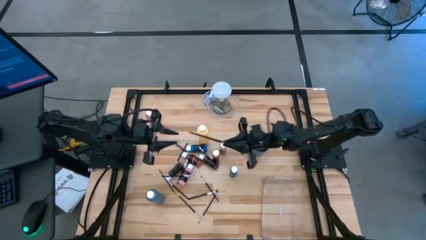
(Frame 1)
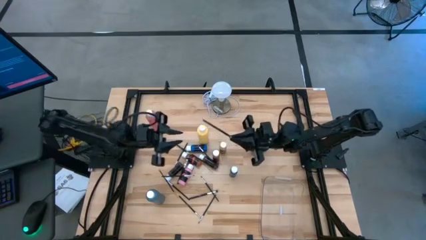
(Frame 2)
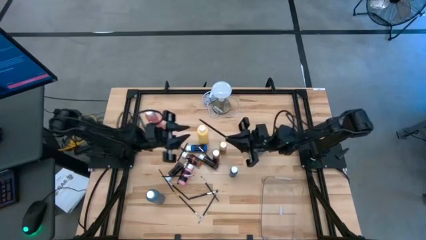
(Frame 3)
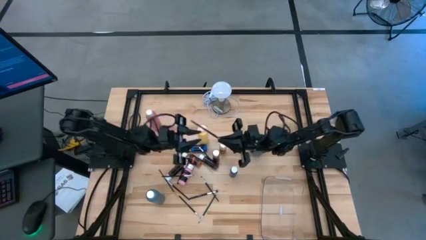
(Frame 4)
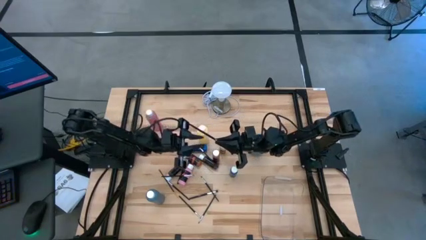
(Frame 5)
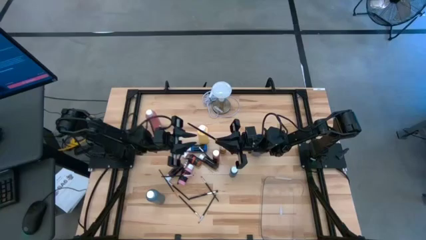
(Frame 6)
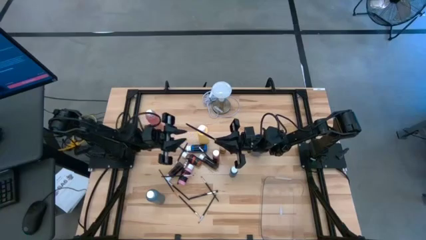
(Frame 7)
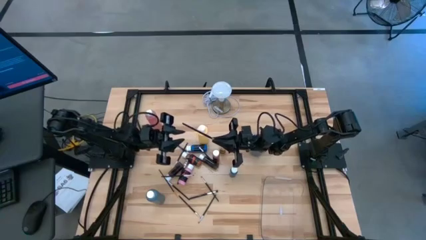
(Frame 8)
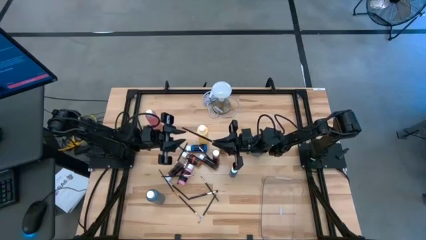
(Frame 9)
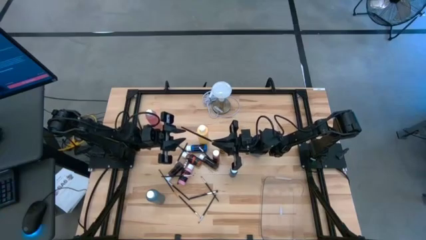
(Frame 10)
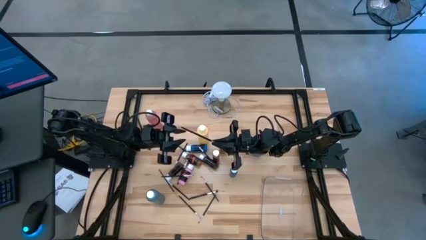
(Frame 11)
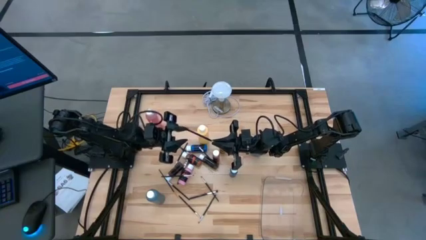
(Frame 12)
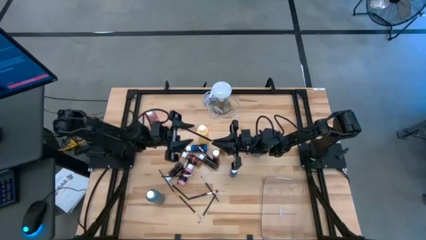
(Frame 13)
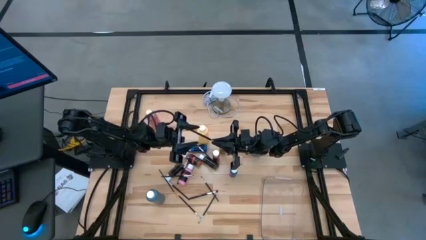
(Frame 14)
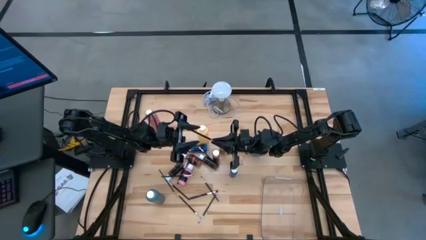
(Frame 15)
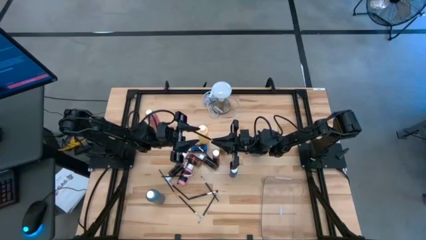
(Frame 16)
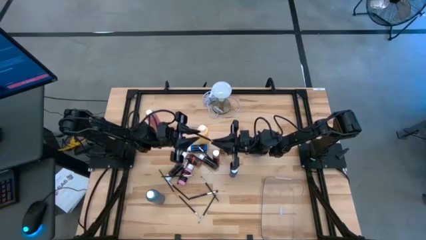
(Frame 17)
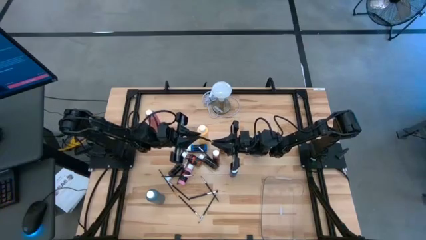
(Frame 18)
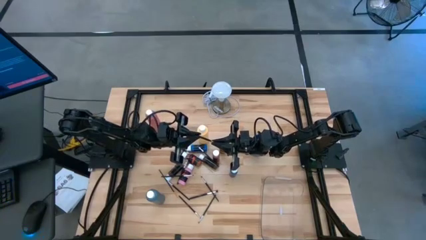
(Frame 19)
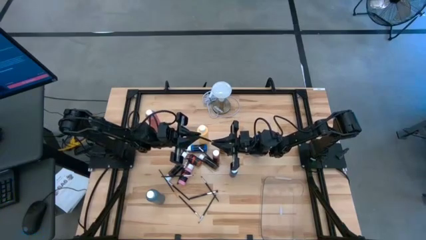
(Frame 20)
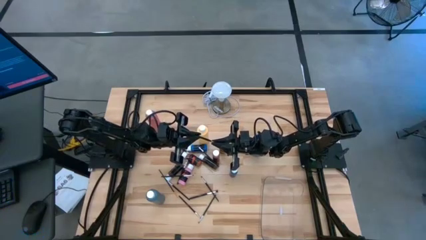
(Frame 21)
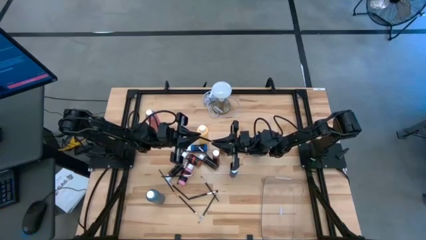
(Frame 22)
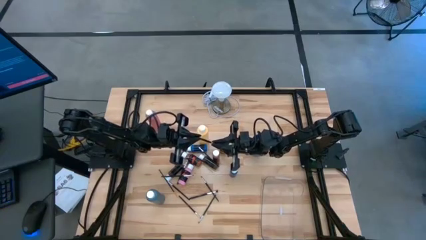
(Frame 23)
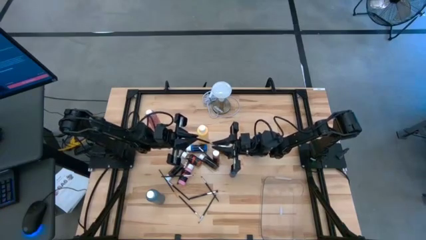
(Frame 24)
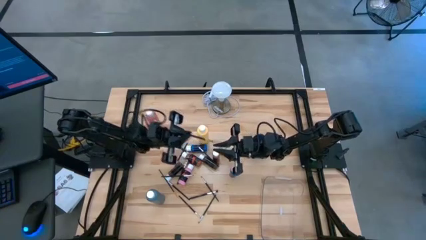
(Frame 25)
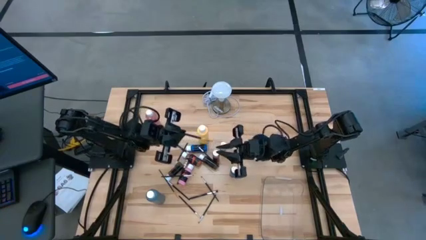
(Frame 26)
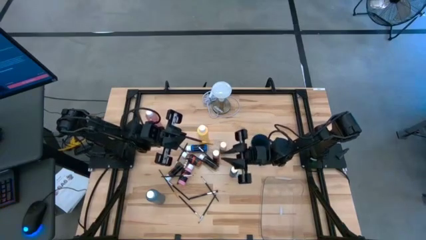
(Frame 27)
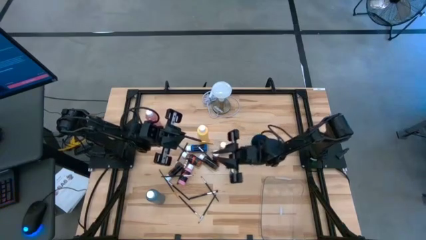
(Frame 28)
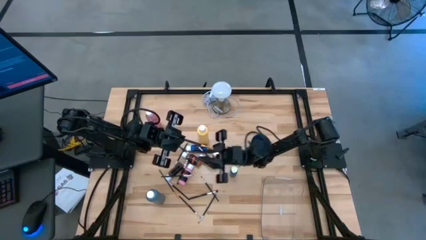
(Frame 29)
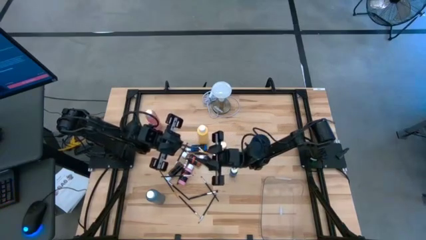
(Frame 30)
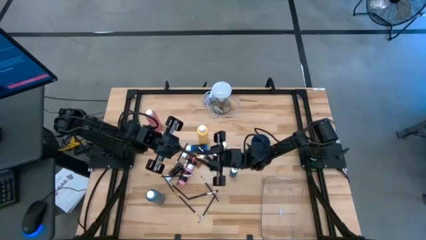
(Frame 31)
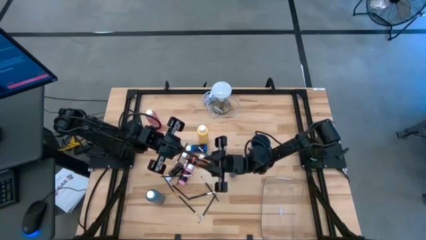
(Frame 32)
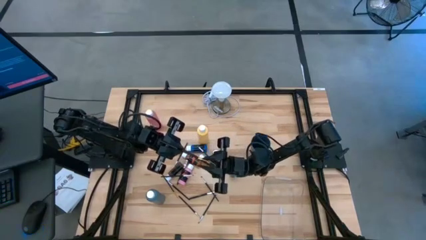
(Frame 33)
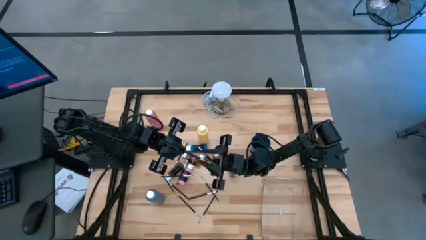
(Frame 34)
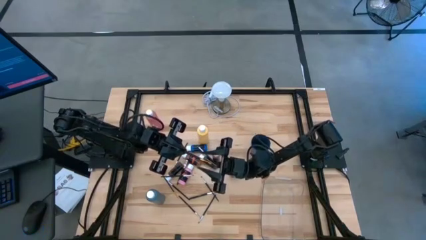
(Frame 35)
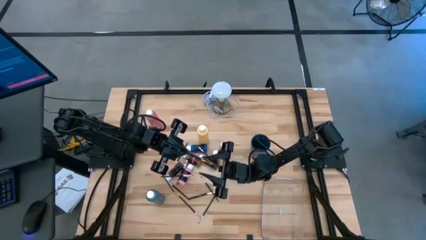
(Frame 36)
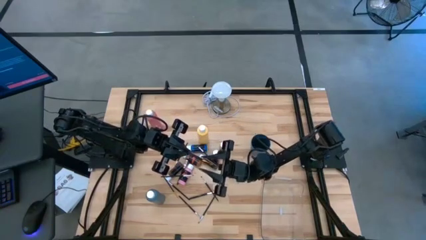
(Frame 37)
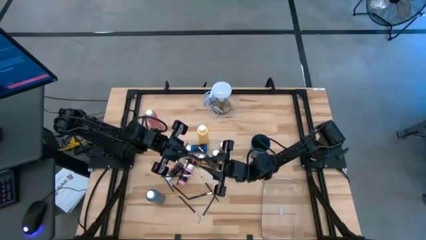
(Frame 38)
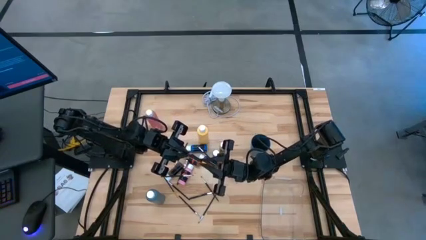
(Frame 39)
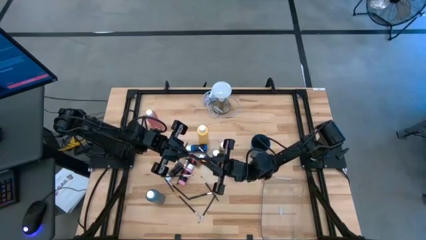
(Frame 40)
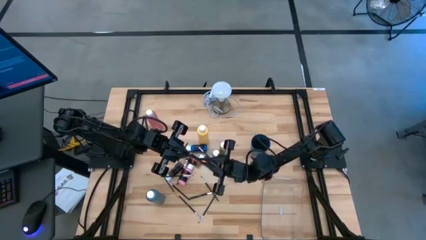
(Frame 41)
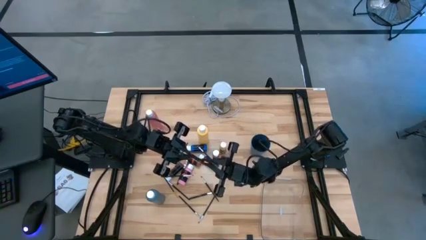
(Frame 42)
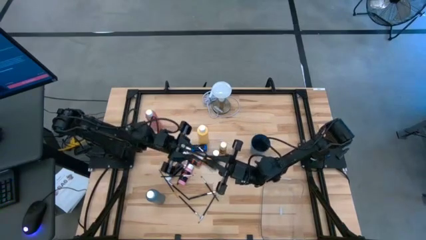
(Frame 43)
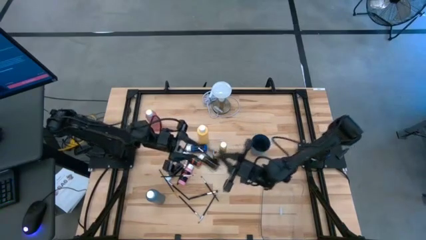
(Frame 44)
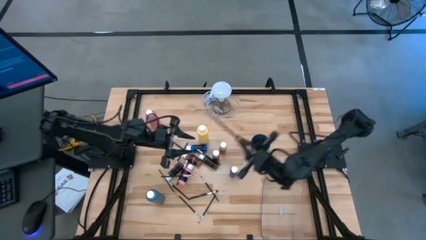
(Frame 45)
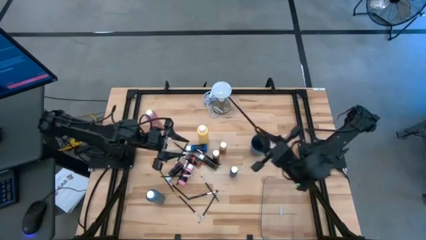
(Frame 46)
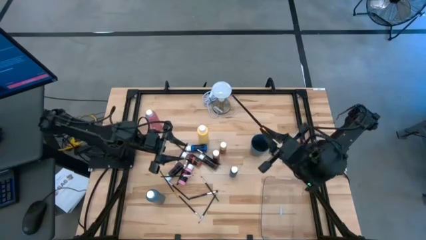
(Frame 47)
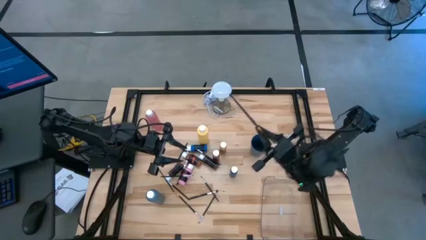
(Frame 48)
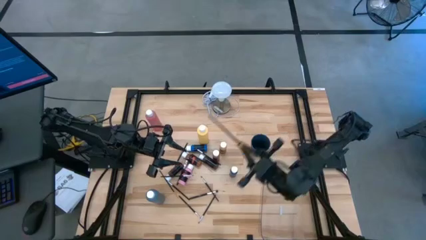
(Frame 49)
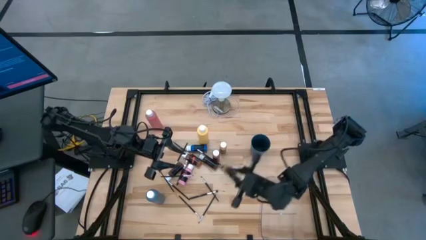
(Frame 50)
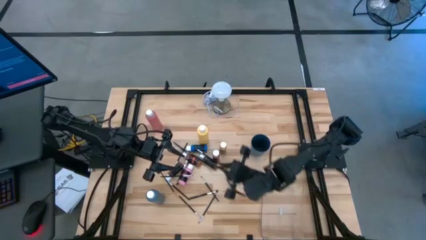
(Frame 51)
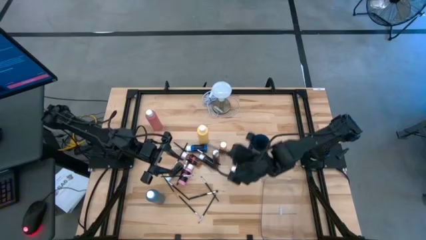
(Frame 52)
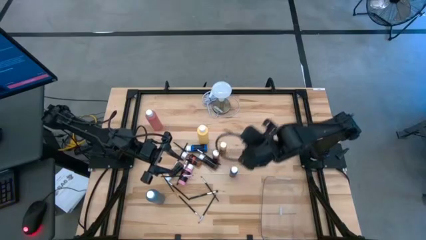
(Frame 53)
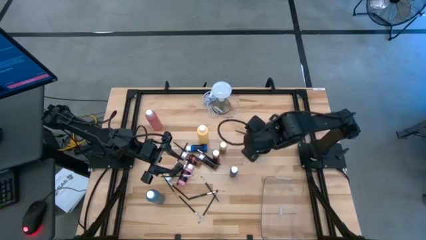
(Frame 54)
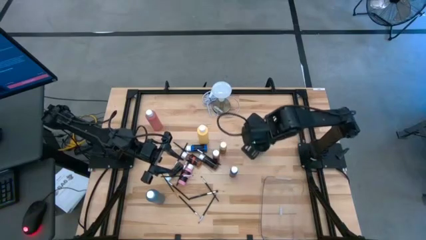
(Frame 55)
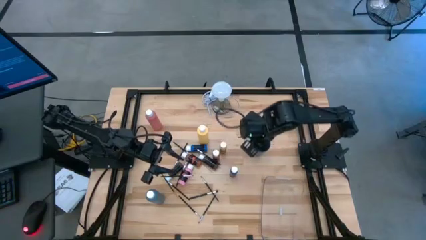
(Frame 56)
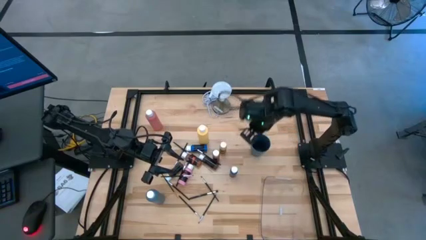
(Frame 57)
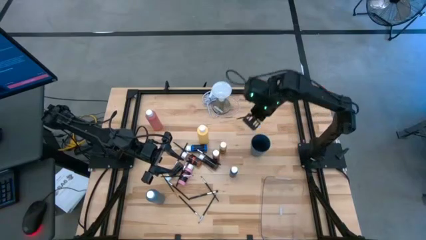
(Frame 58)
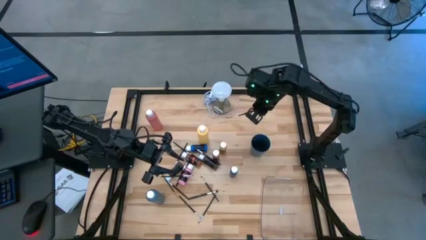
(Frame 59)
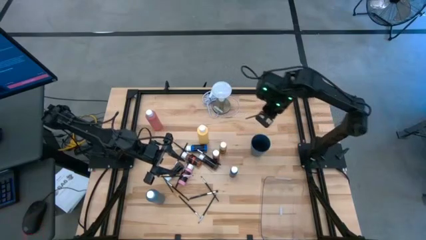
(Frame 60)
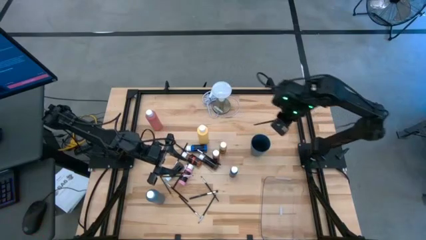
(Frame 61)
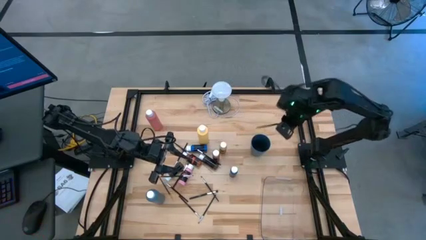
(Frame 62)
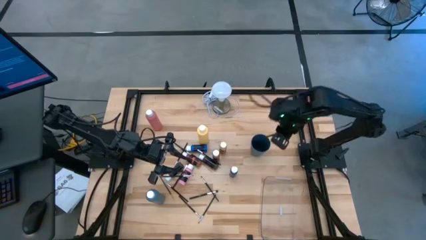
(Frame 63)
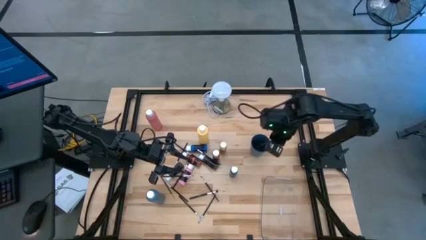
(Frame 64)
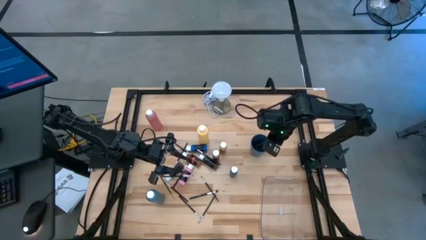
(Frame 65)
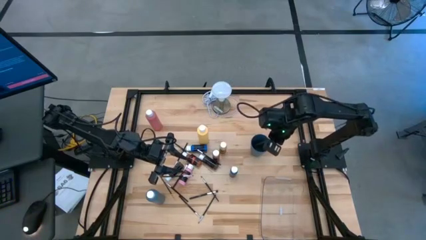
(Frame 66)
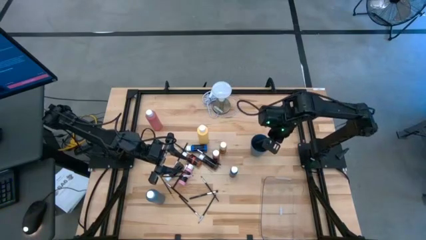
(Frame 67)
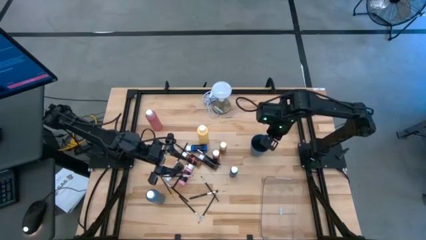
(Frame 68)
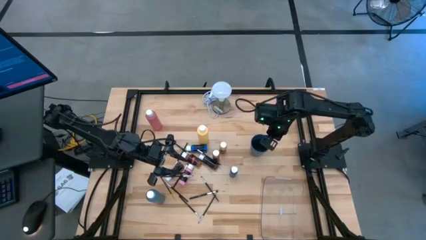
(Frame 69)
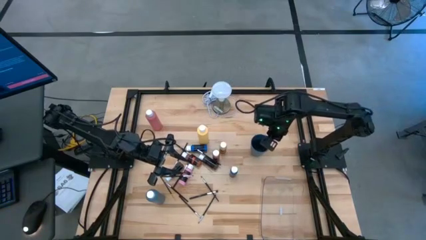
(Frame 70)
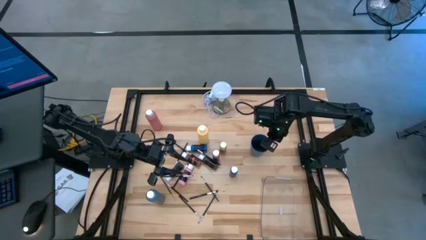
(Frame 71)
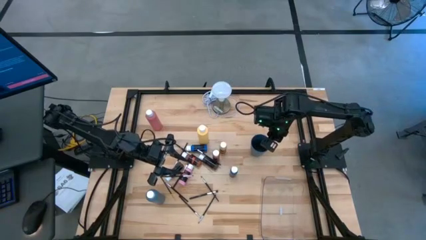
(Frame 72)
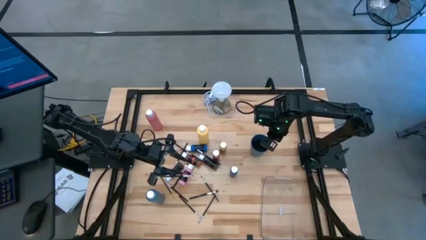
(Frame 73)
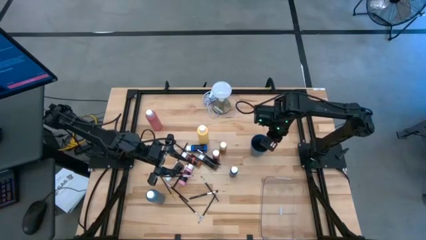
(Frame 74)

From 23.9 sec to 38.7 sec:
Task: Pick & Place Paint Supplies
Put the top black gold paintbrush into the blue cup
